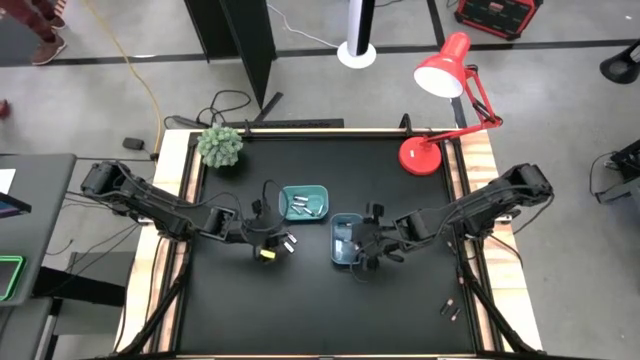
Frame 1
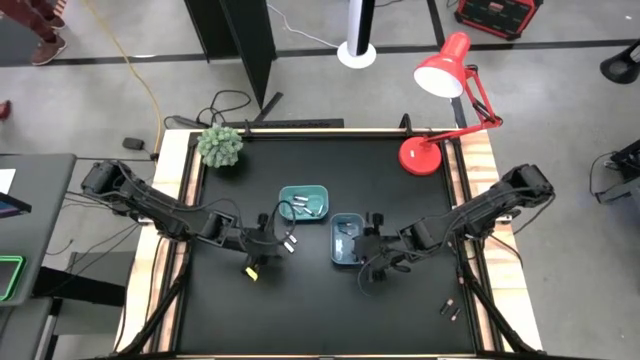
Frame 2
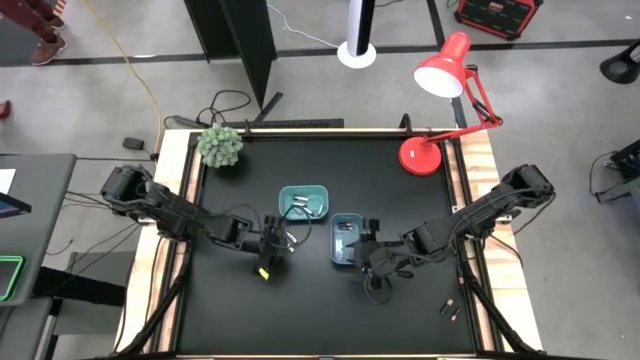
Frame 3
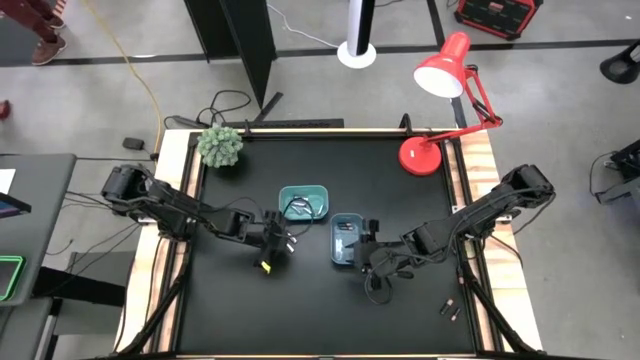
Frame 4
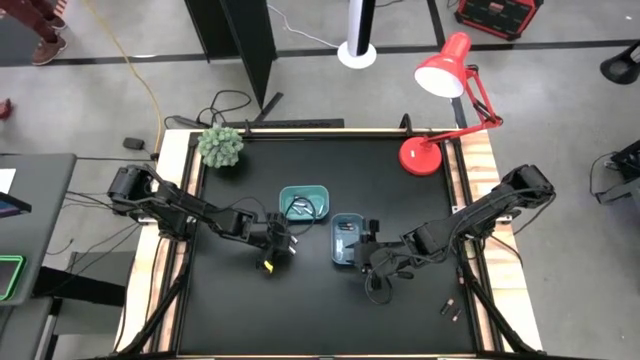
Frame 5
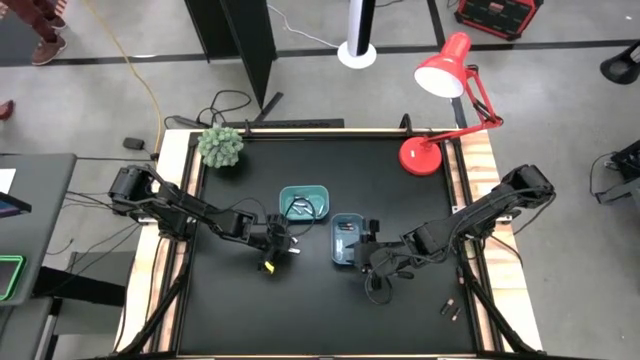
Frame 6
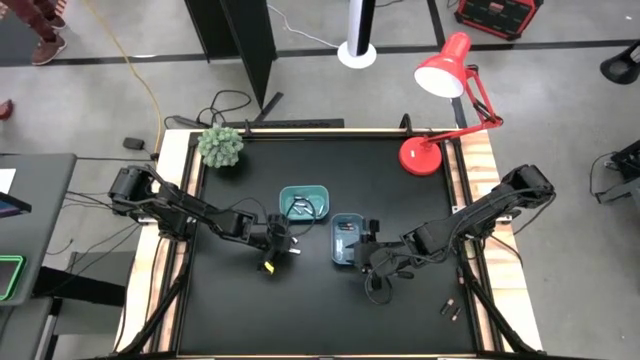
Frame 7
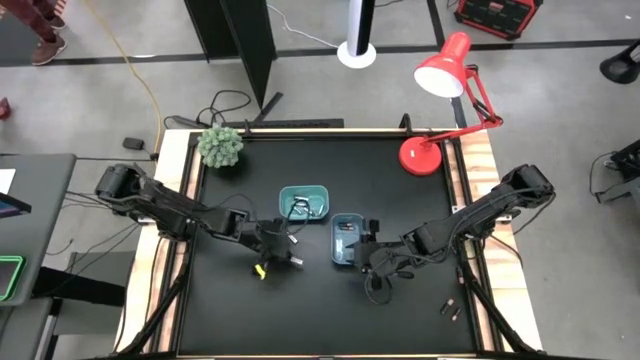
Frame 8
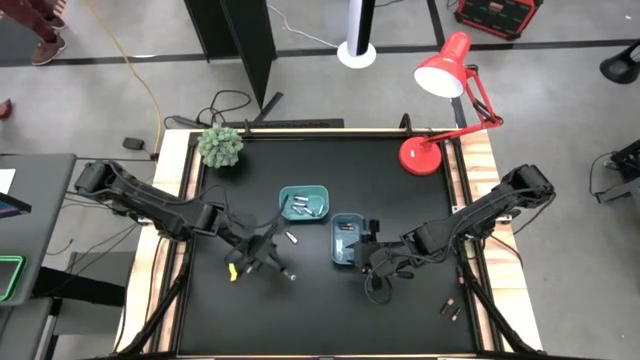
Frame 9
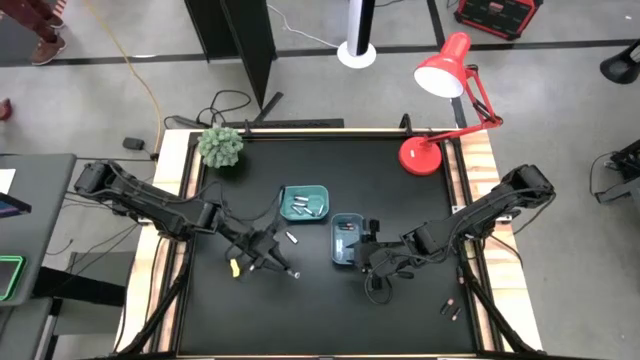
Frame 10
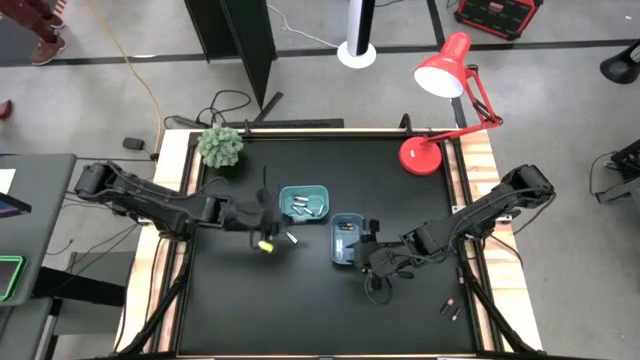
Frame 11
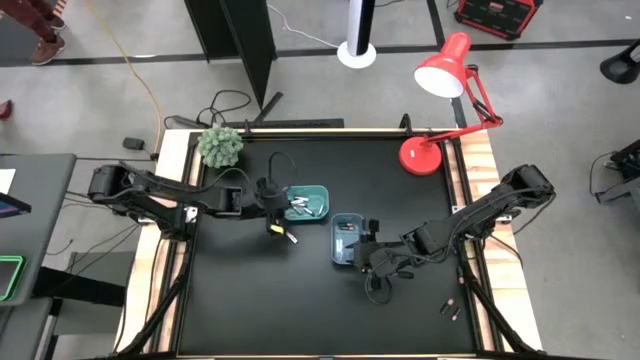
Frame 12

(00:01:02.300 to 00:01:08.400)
Task: Sort batteries
Put the silver battery into the light blue bin

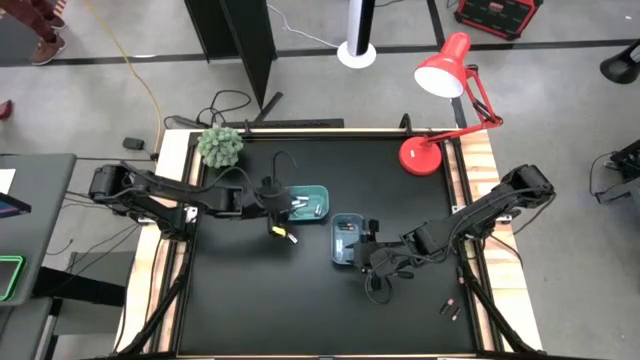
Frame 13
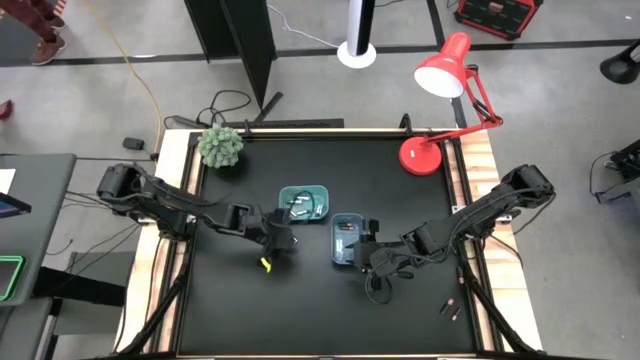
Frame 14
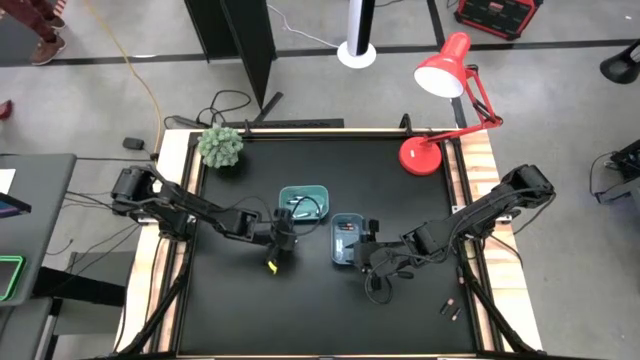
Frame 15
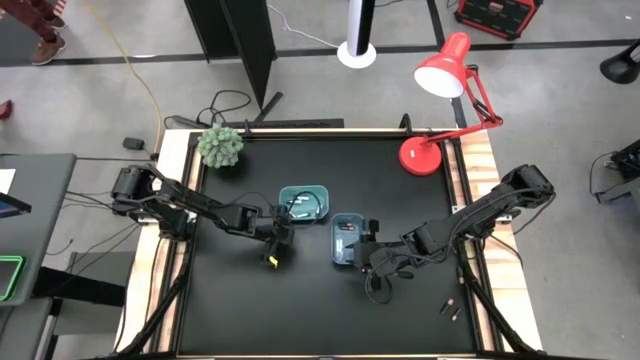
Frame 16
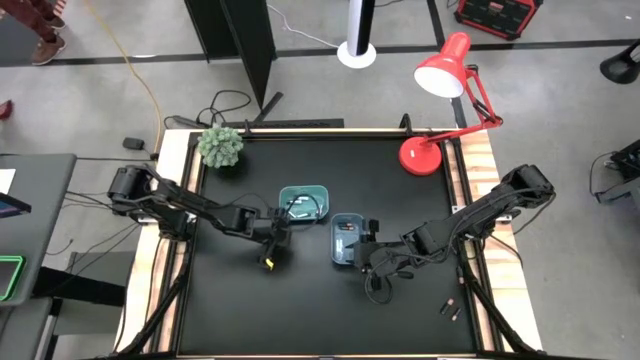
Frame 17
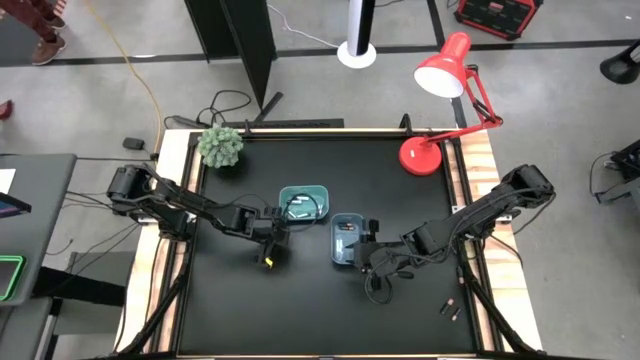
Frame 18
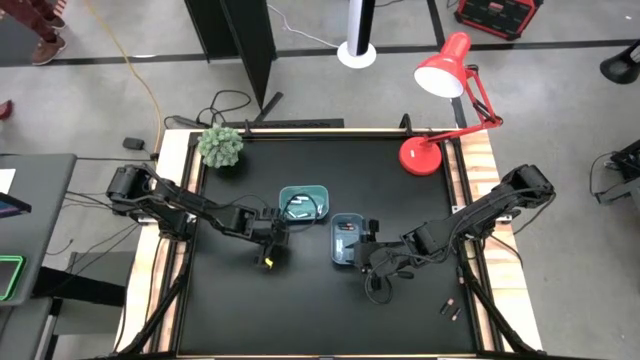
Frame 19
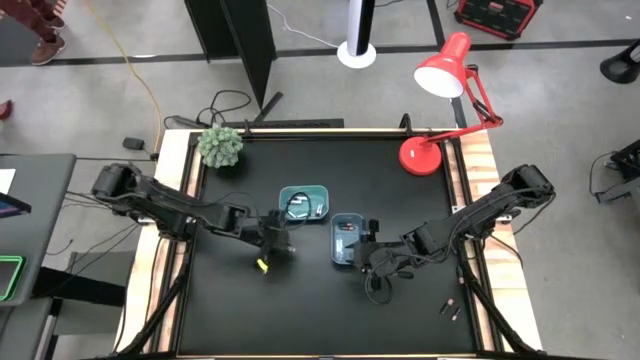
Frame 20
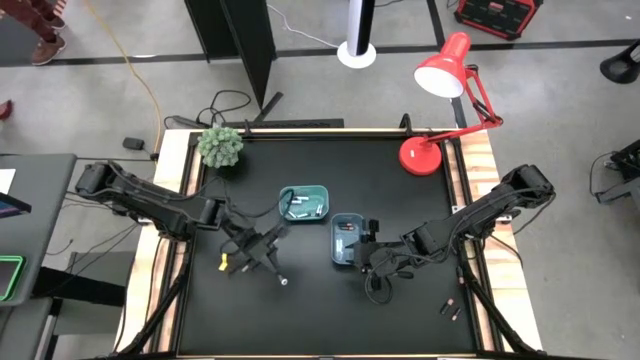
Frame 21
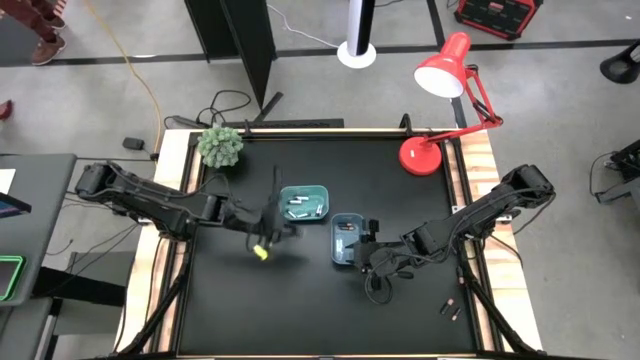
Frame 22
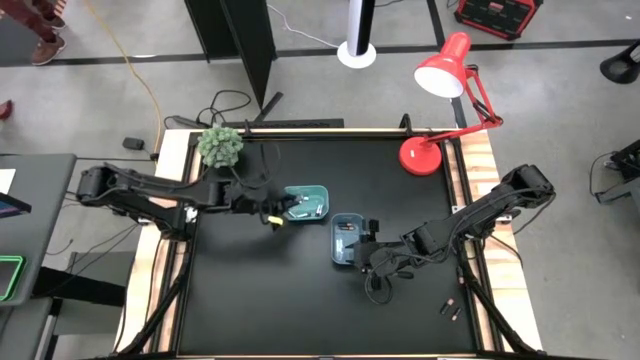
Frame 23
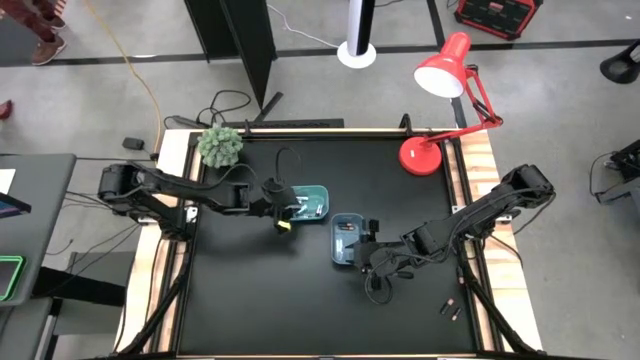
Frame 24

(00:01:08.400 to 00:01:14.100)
Put the silver battery into the light blue bin

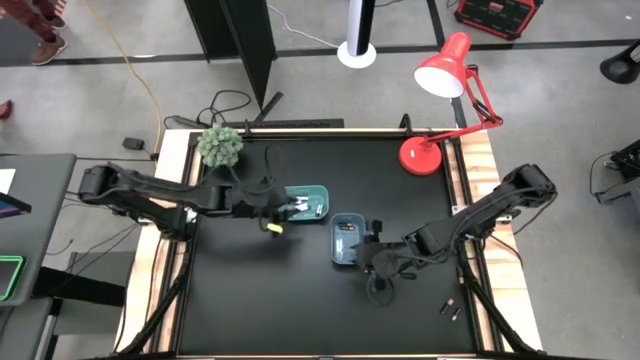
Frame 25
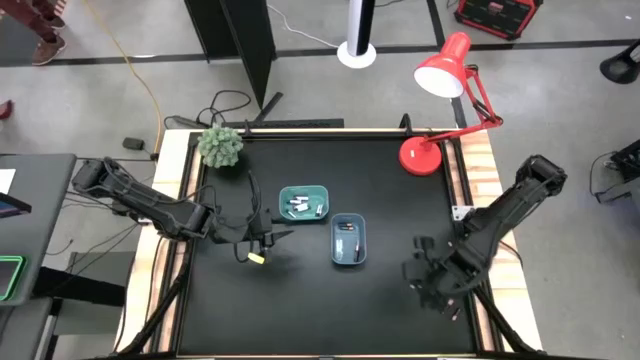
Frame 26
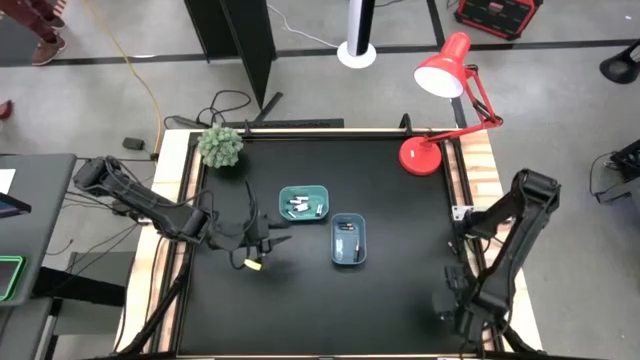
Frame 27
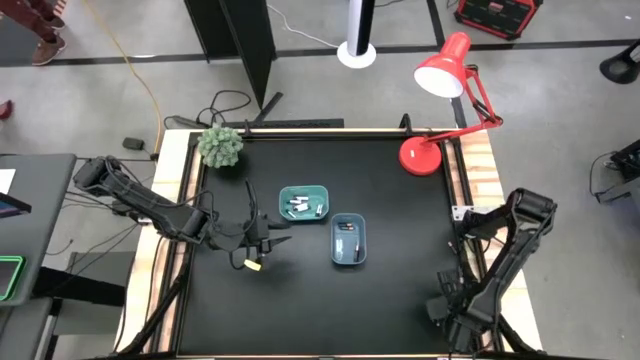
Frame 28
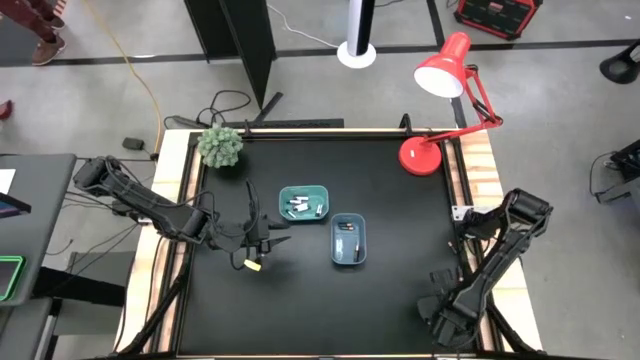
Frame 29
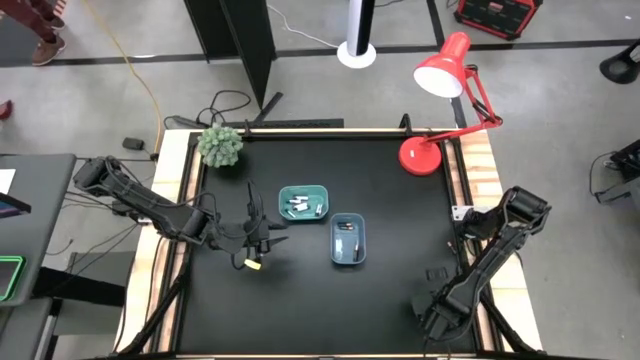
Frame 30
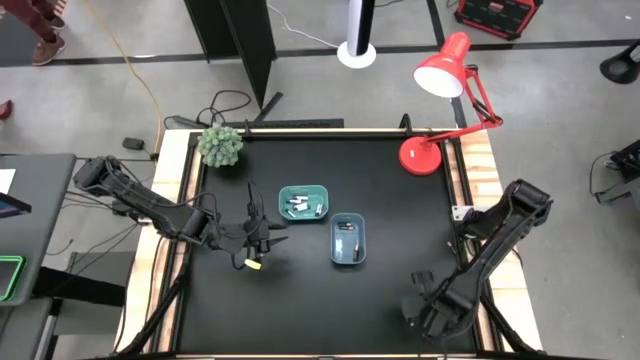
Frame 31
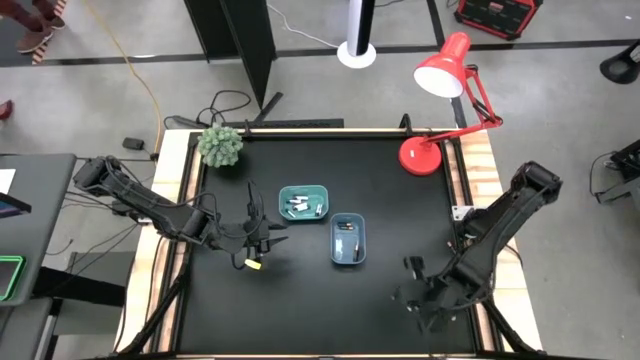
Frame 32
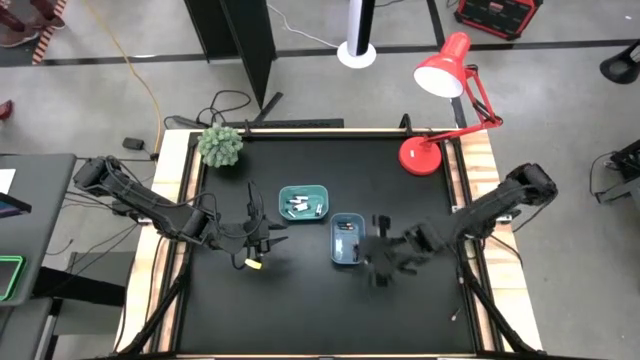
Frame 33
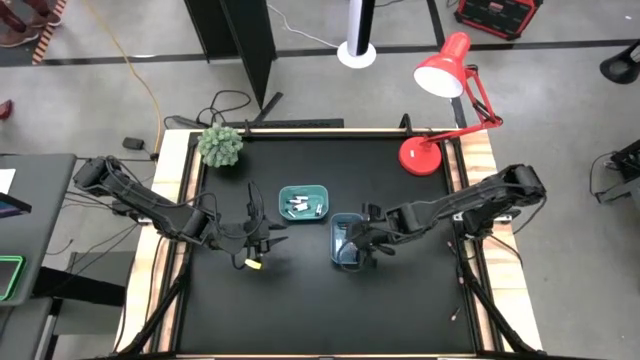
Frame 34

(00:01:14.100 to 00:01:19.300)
Put the black battery into the blue bin

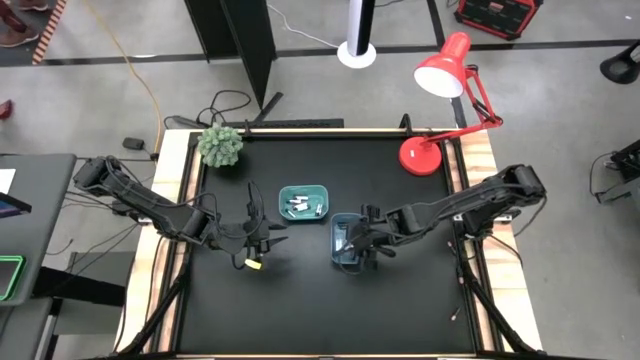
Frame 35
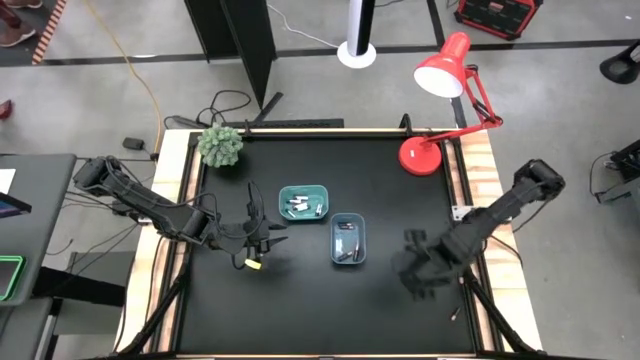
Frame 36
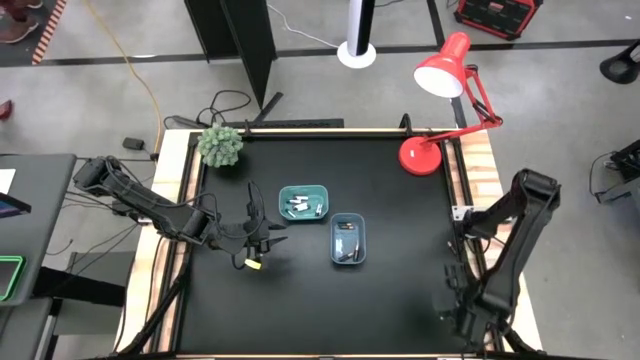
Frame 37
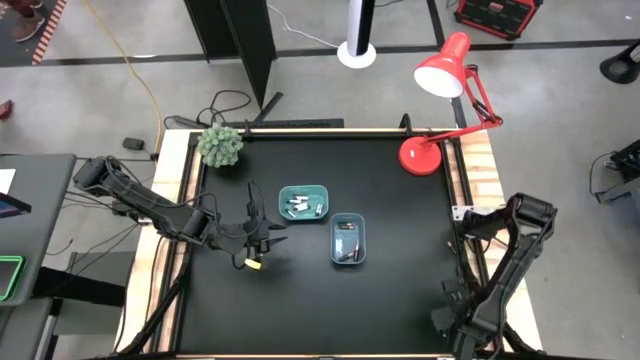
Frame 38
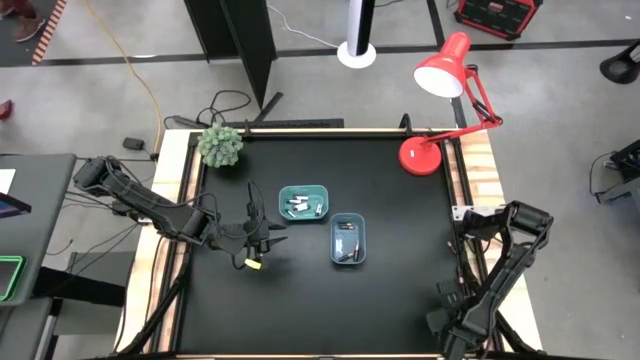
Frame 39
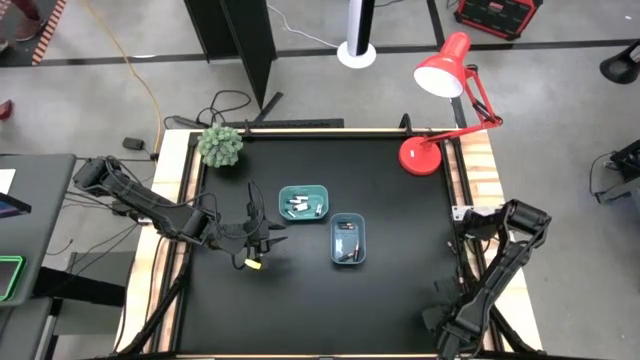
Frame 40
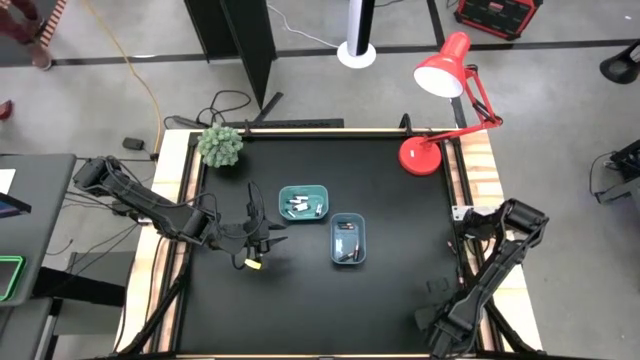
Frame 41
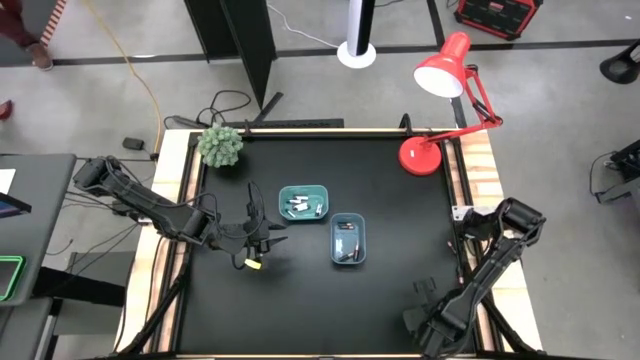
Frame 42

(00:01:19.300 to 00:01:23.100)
Put the black battery into the blue bin
